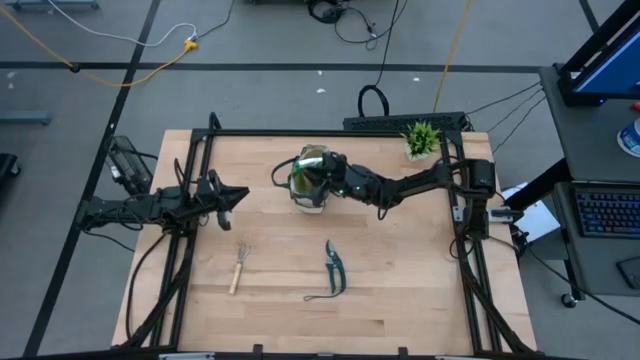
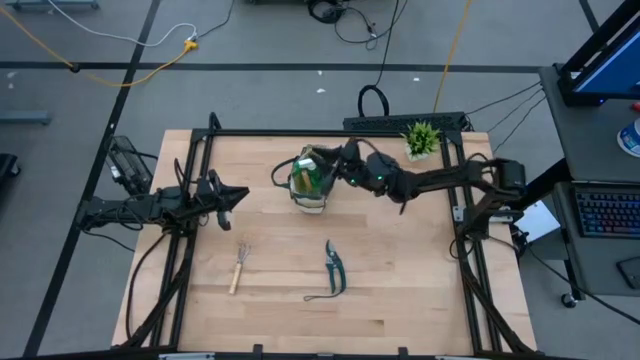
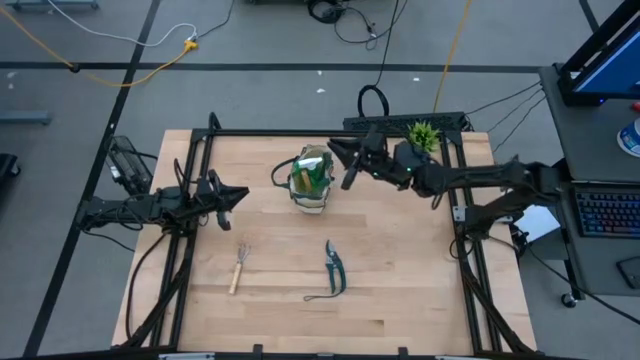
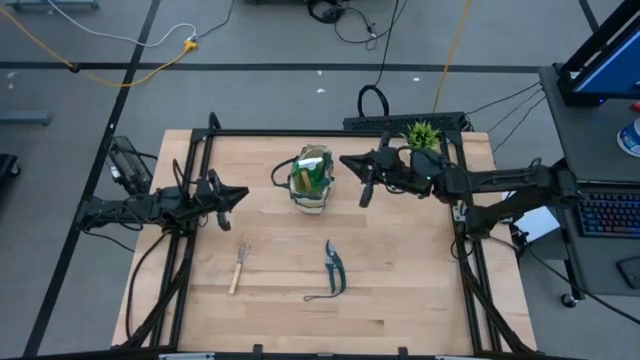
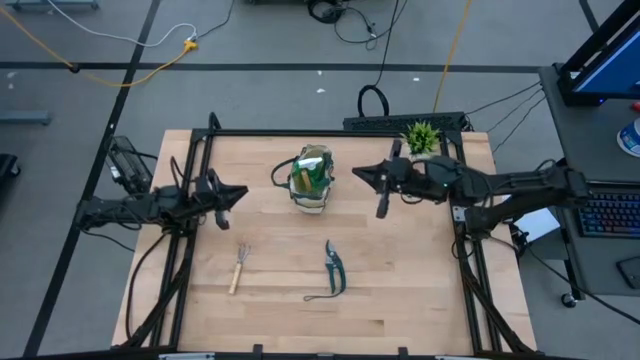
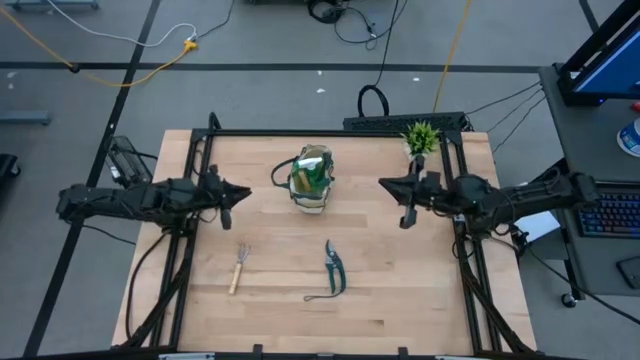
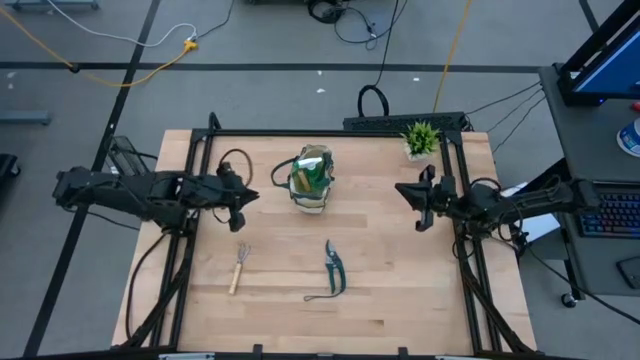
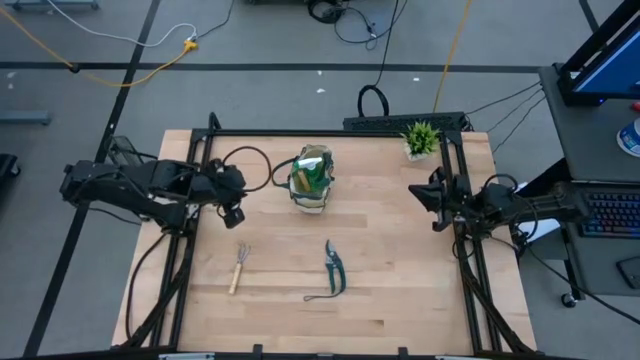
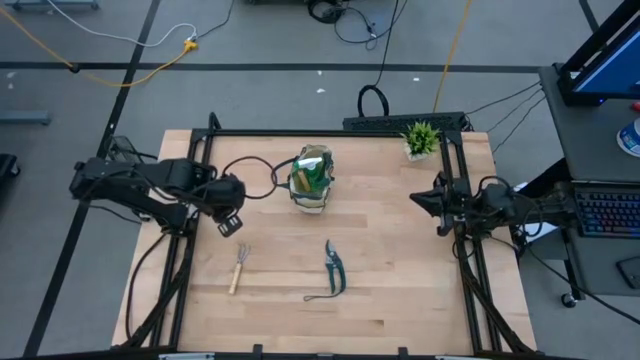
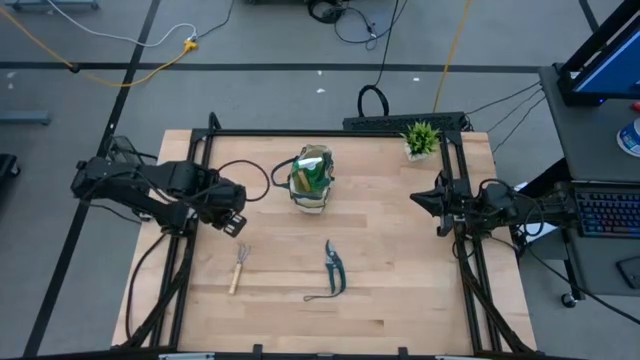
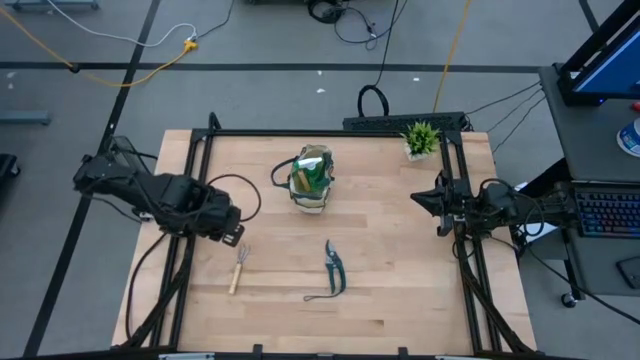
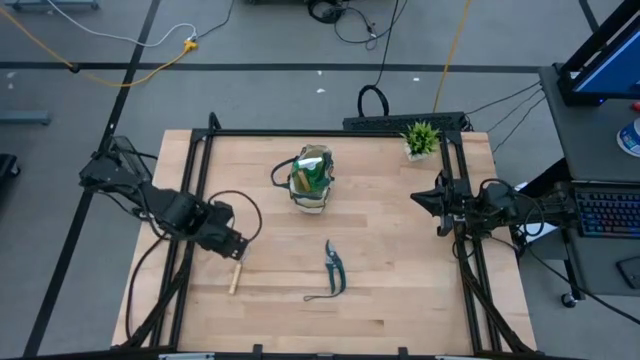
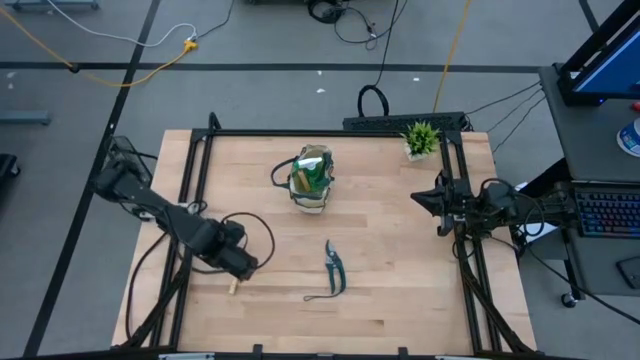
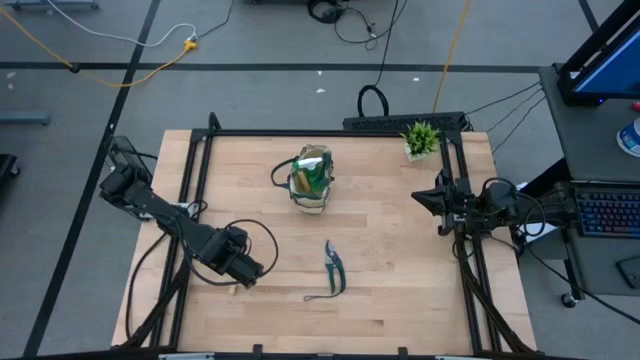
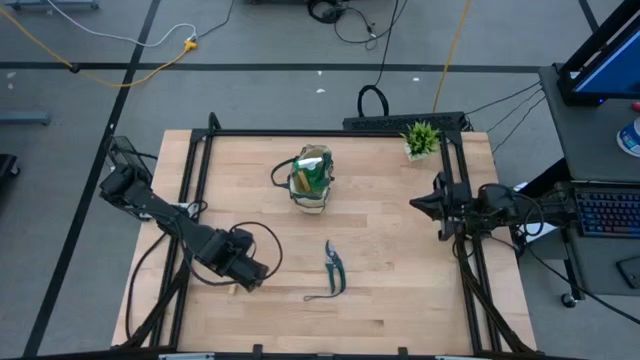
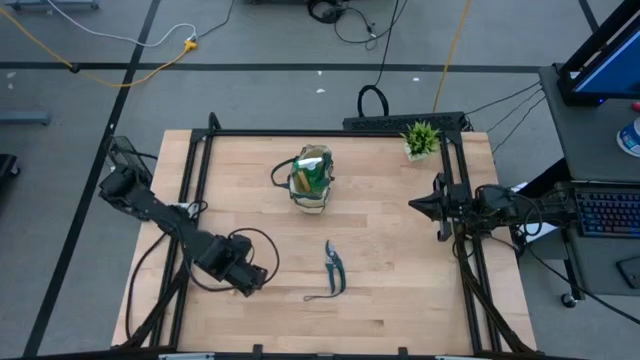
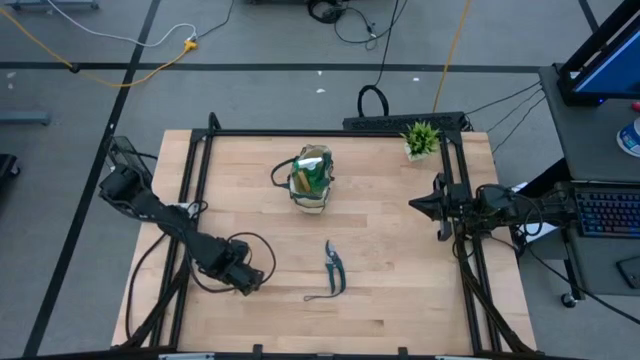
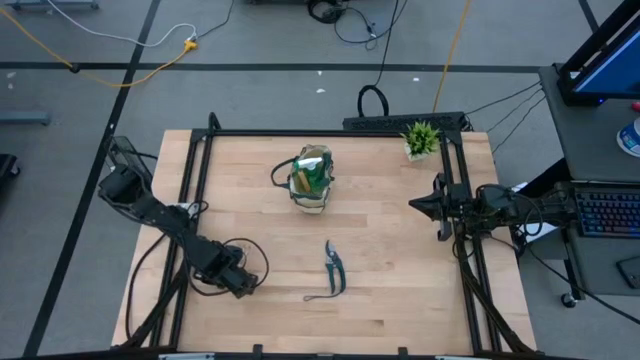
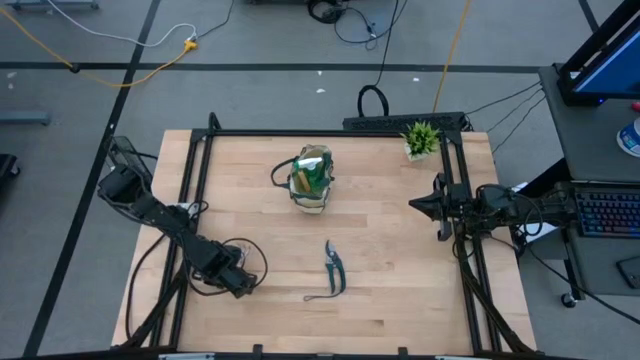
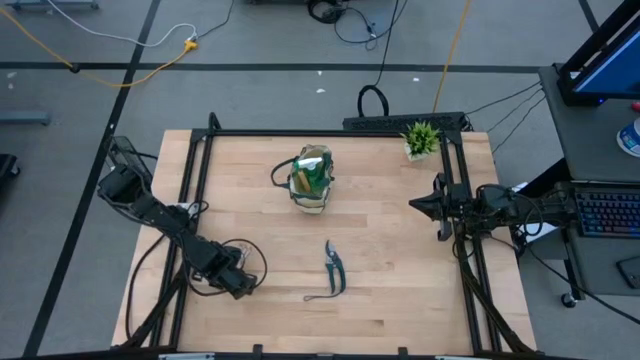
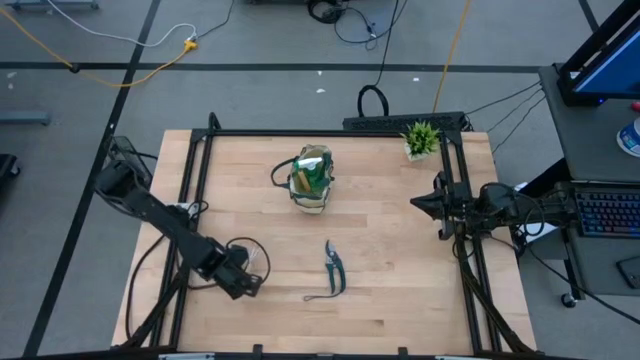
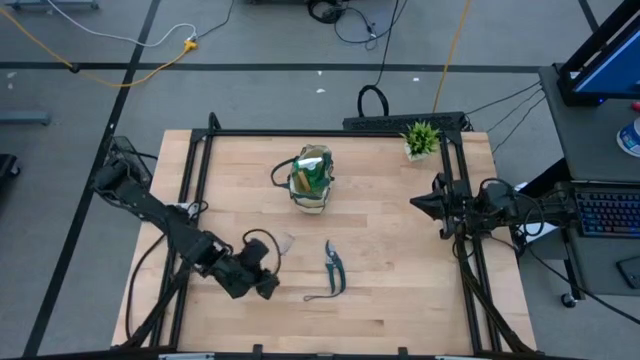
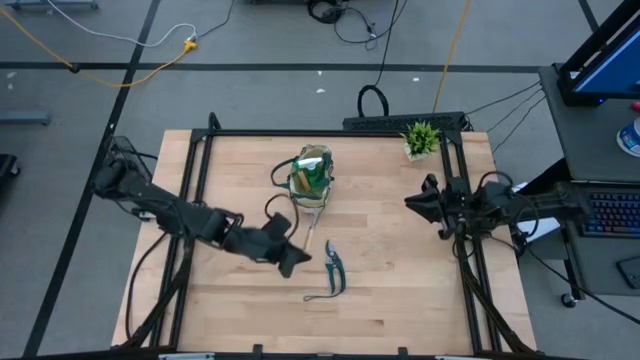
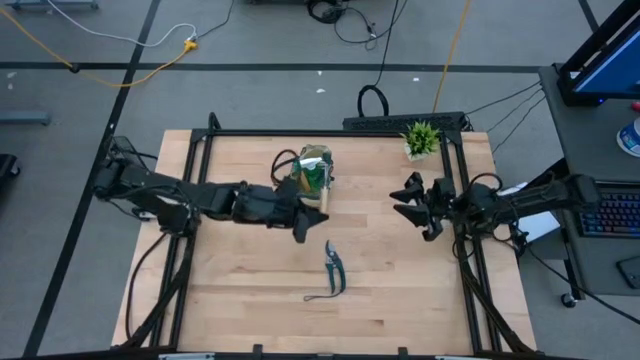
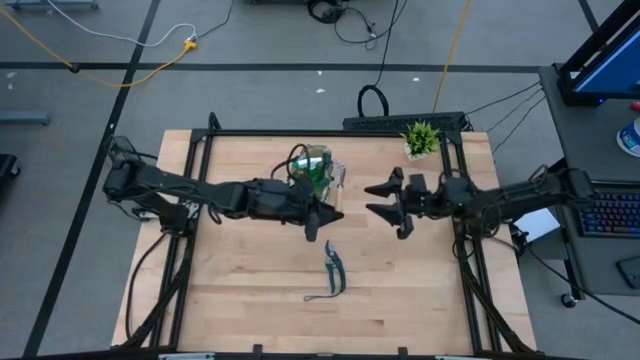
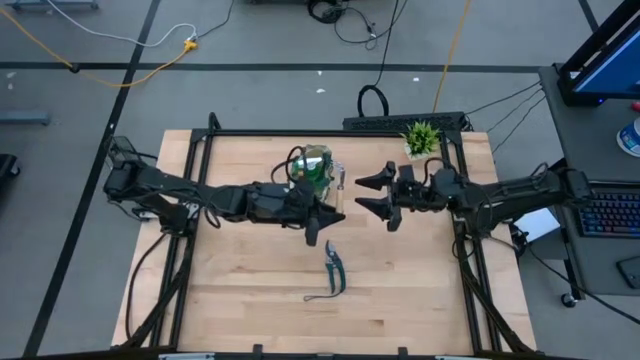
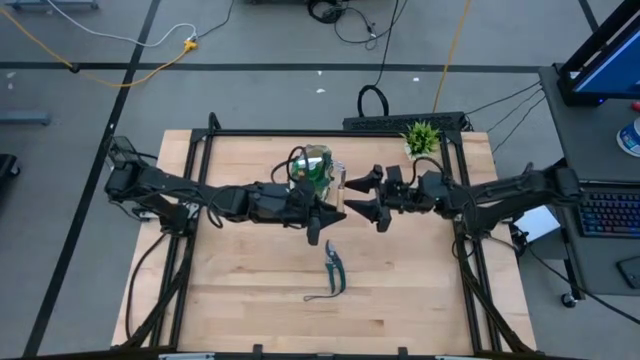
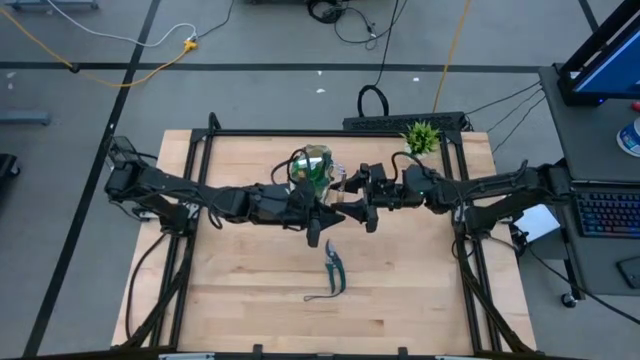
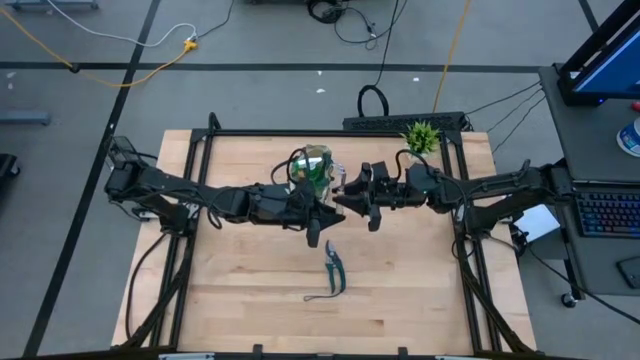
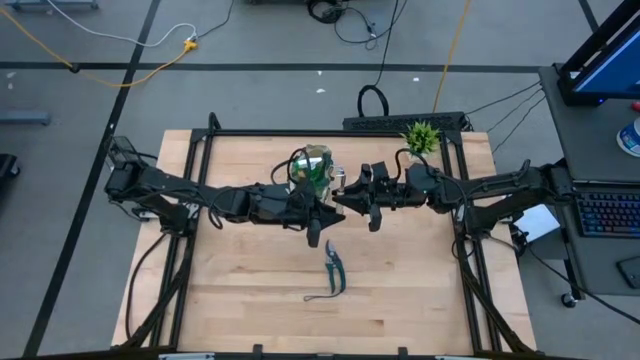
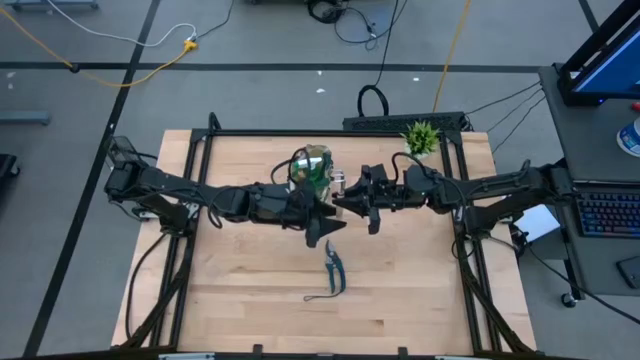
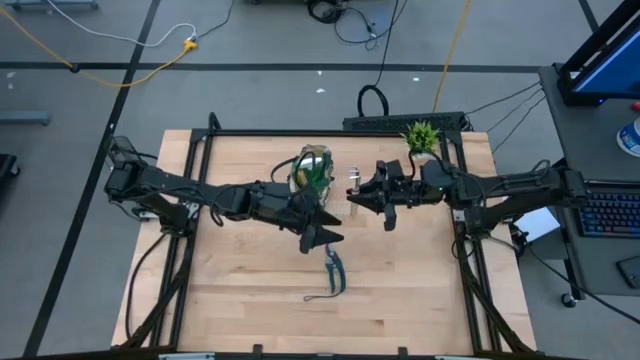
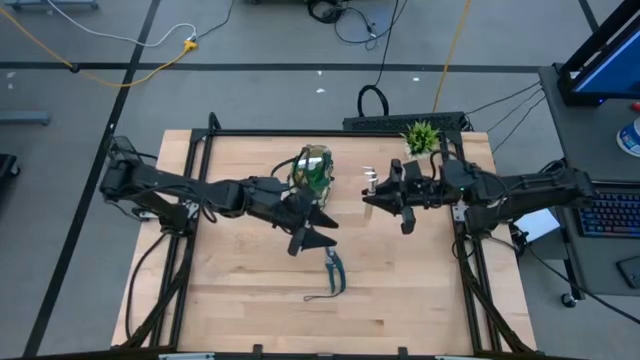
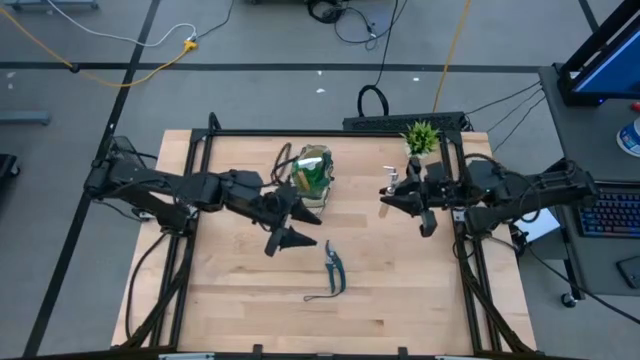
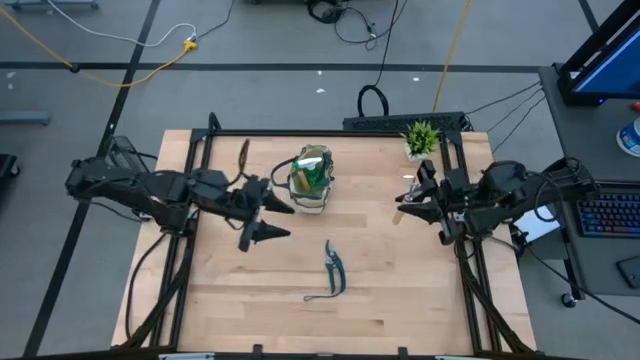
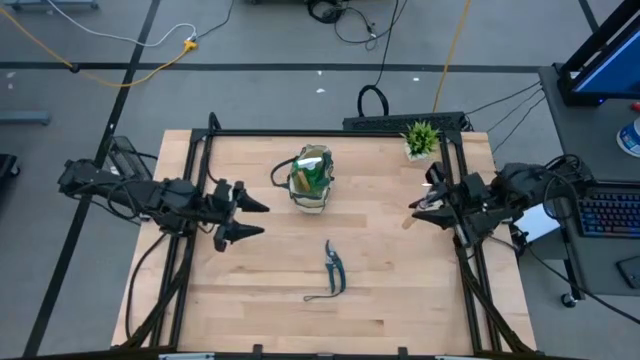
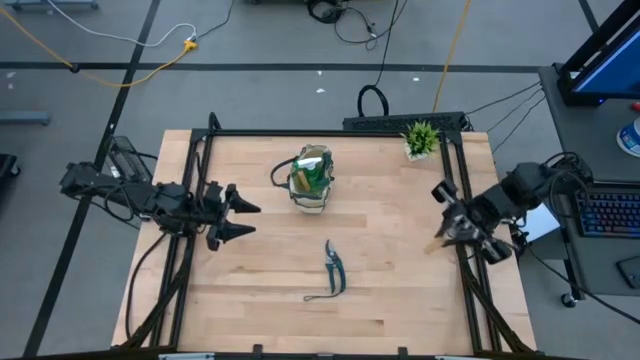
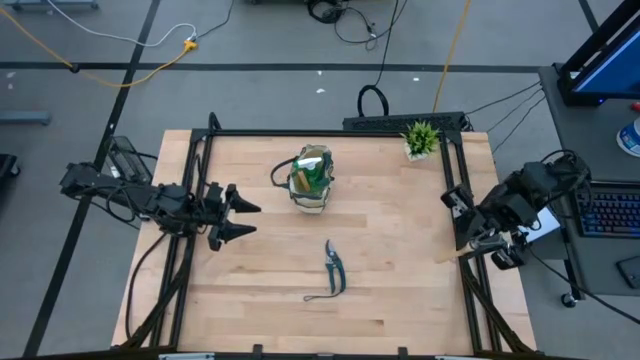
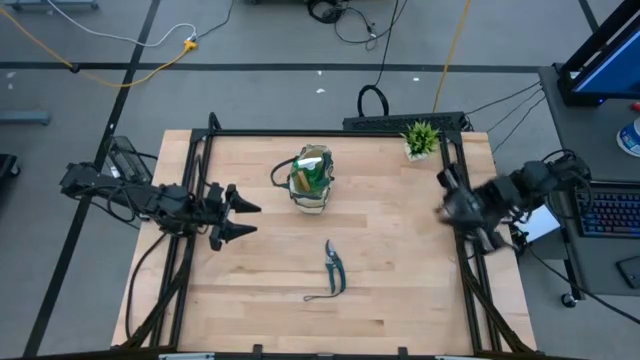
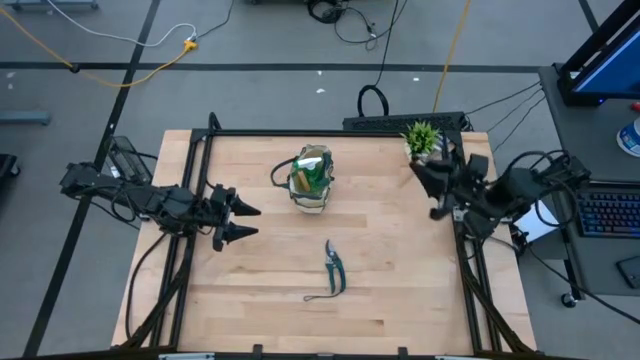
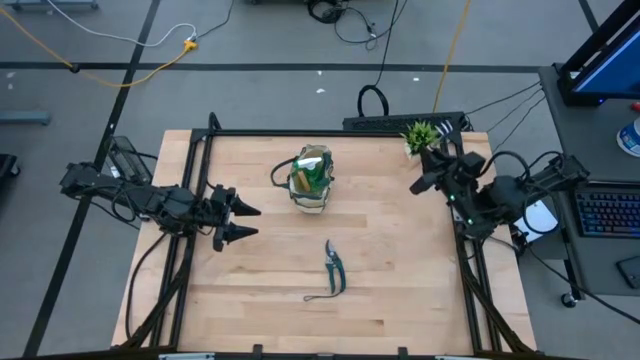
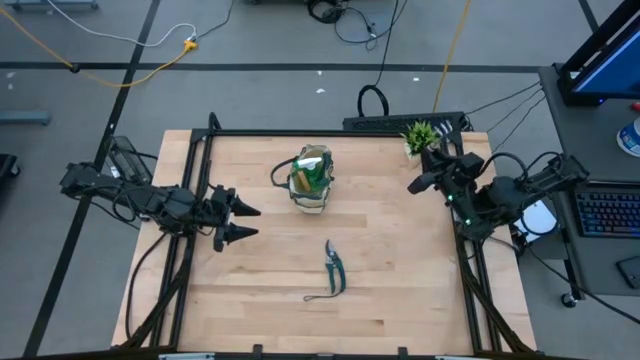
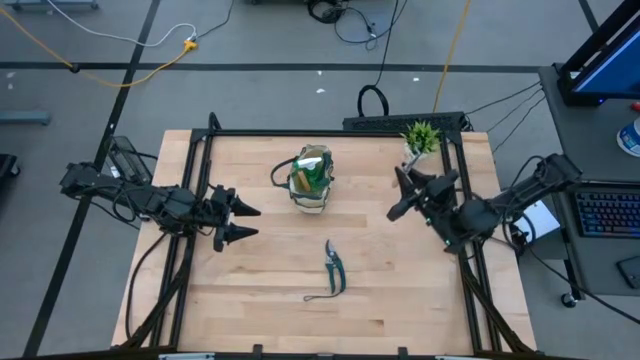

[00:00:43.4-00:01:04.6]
Task: Pick & Place Garden tools in Gardening bag
Put the left hand rake into the top gardening bag

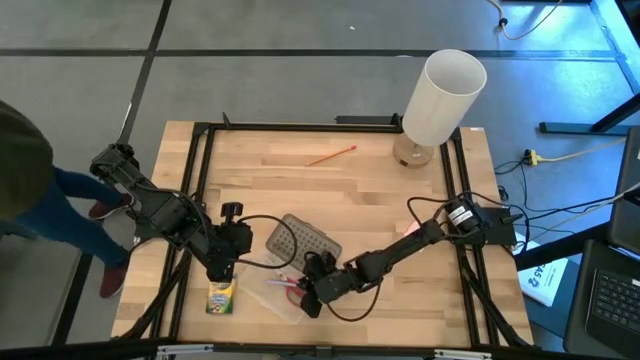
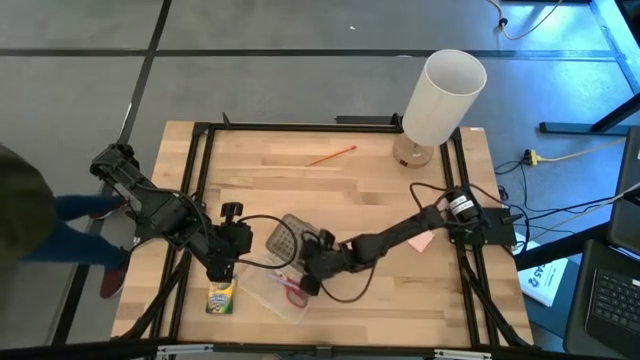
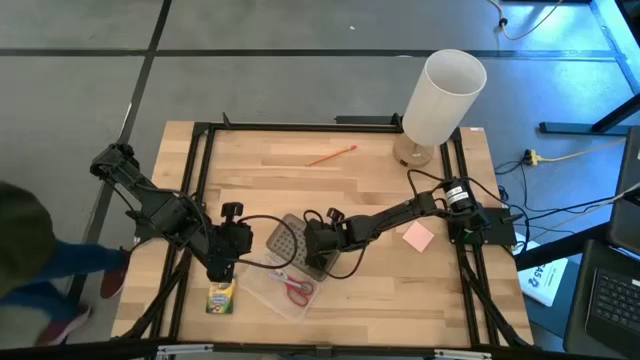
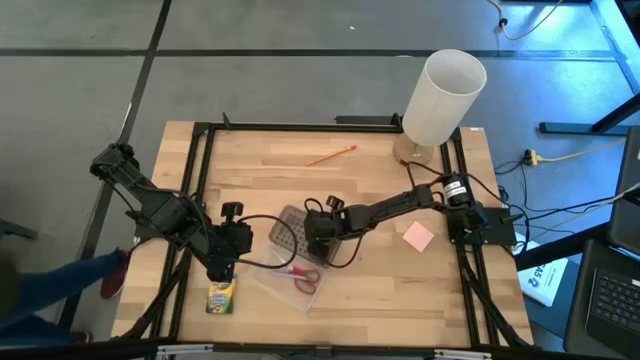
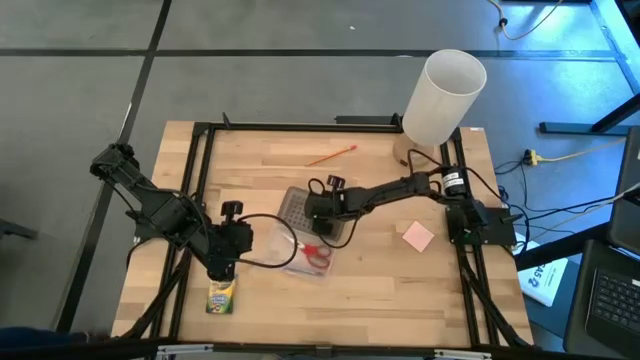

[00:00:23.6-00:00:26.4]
Task: Pack school essentials
Move the black supply box to the center of the table
